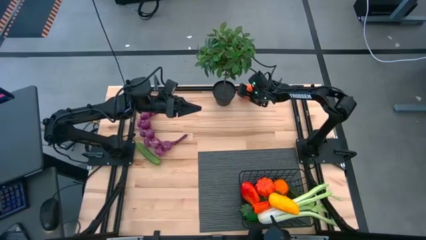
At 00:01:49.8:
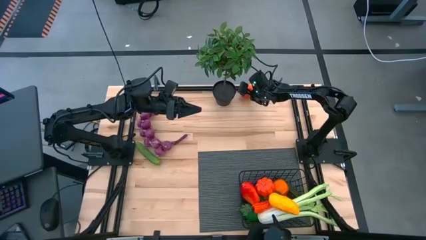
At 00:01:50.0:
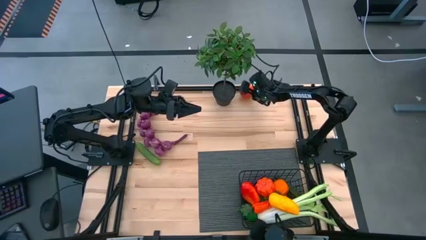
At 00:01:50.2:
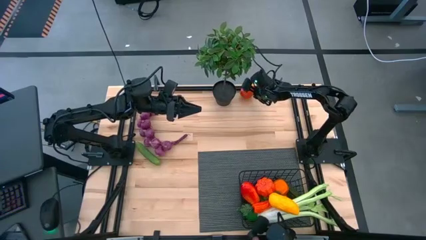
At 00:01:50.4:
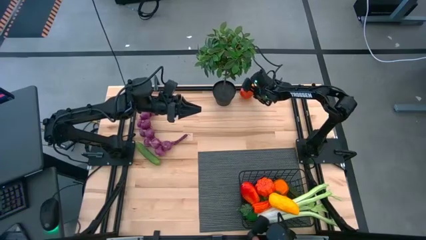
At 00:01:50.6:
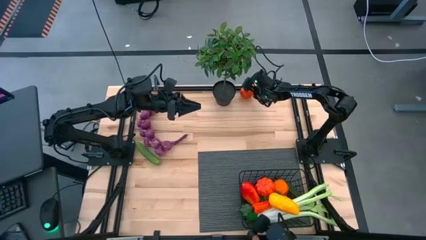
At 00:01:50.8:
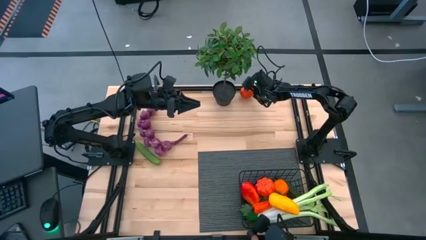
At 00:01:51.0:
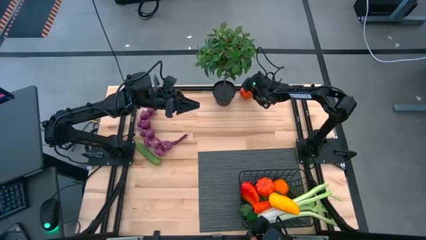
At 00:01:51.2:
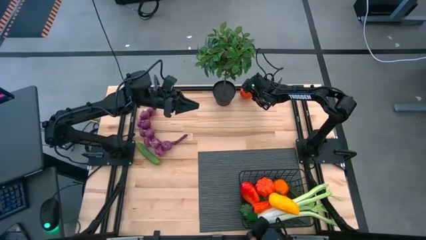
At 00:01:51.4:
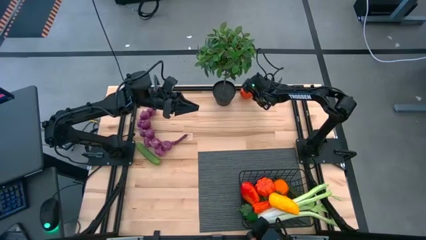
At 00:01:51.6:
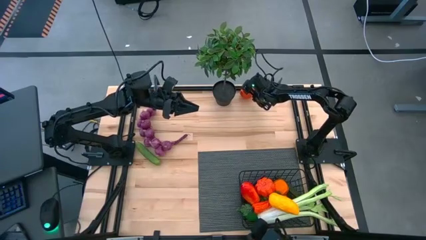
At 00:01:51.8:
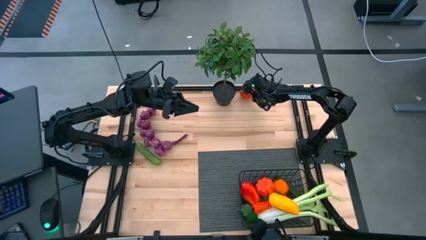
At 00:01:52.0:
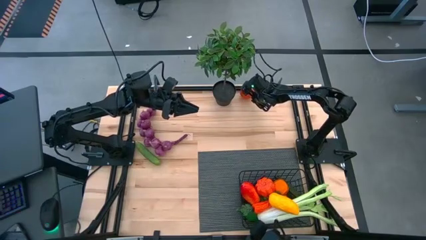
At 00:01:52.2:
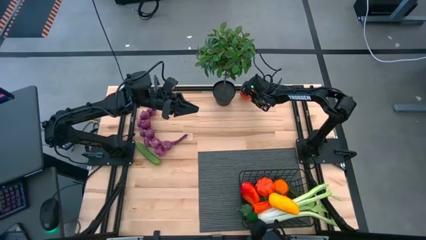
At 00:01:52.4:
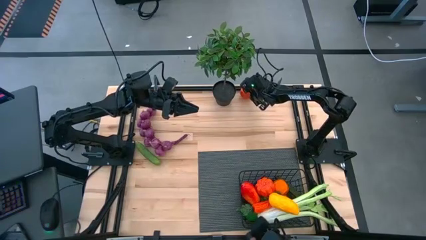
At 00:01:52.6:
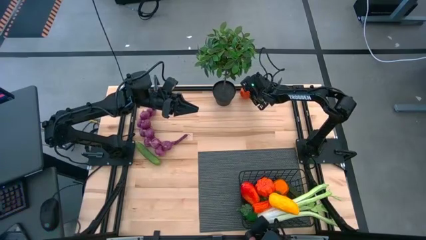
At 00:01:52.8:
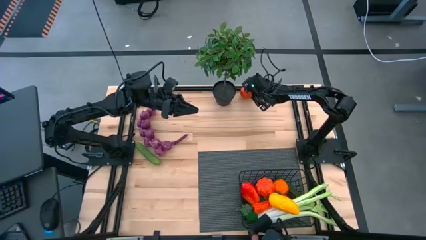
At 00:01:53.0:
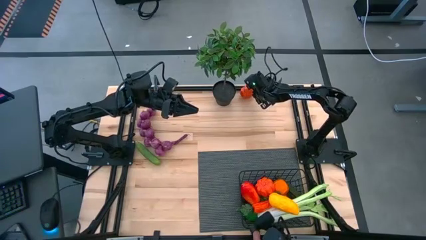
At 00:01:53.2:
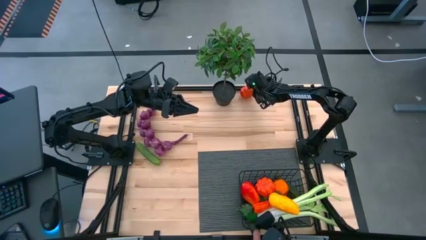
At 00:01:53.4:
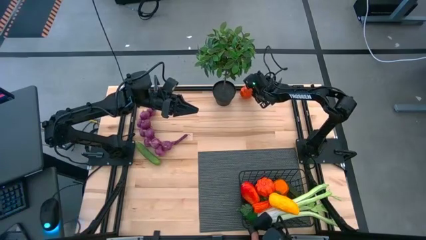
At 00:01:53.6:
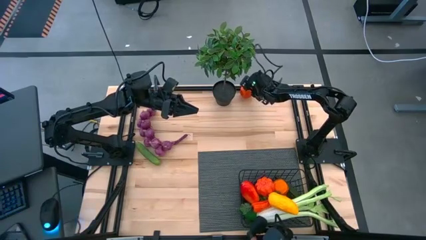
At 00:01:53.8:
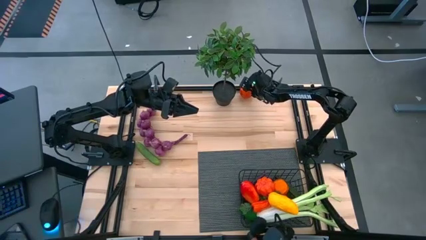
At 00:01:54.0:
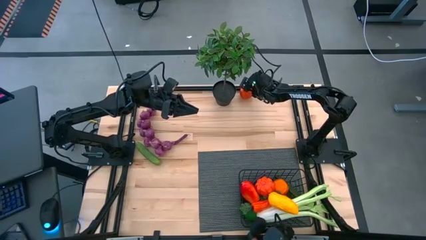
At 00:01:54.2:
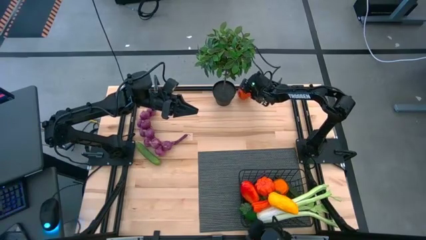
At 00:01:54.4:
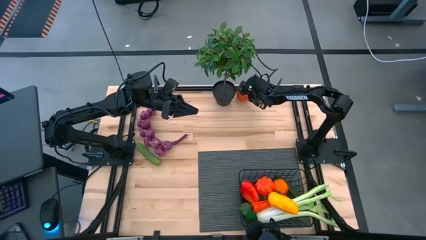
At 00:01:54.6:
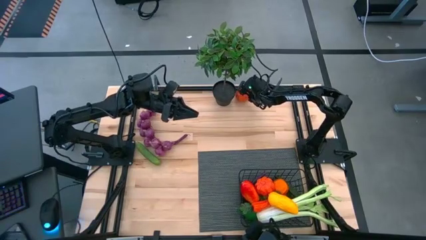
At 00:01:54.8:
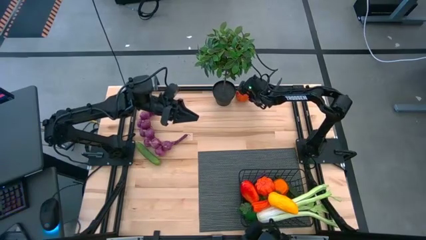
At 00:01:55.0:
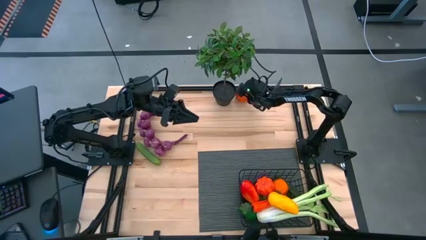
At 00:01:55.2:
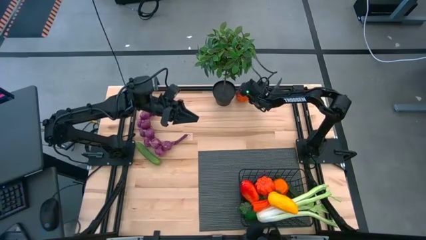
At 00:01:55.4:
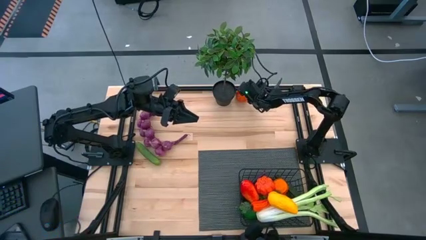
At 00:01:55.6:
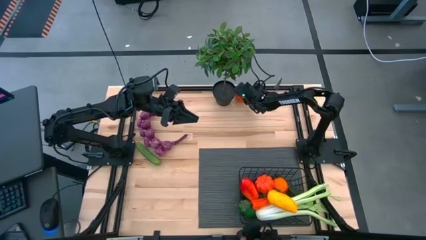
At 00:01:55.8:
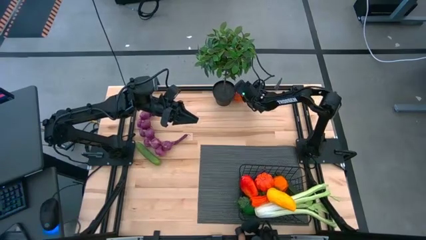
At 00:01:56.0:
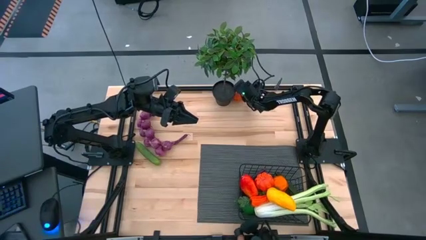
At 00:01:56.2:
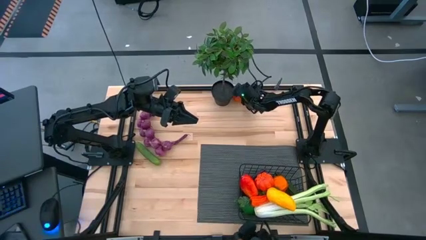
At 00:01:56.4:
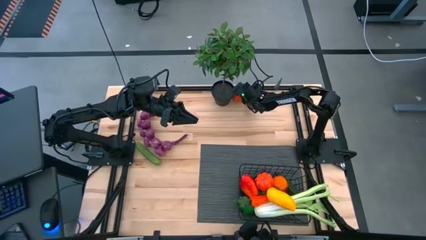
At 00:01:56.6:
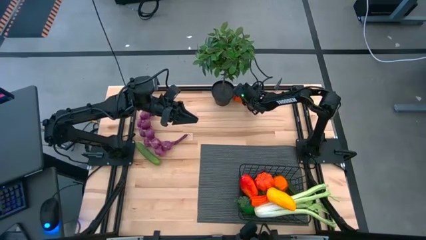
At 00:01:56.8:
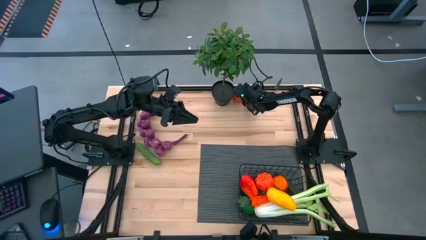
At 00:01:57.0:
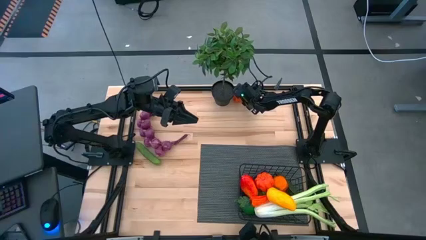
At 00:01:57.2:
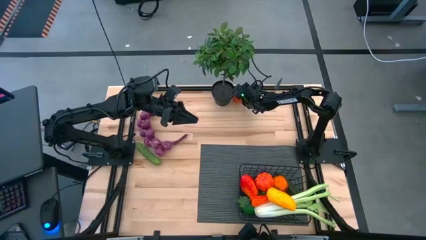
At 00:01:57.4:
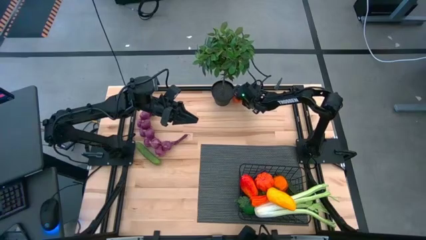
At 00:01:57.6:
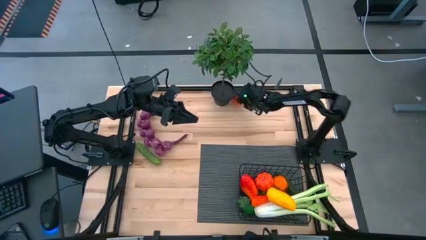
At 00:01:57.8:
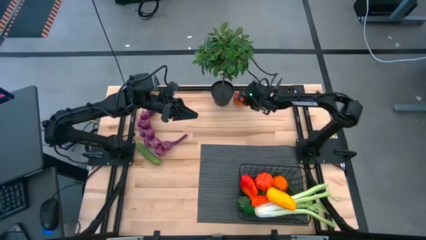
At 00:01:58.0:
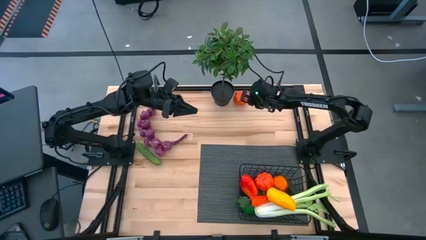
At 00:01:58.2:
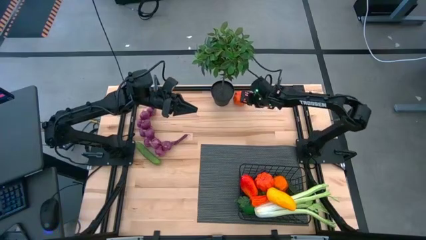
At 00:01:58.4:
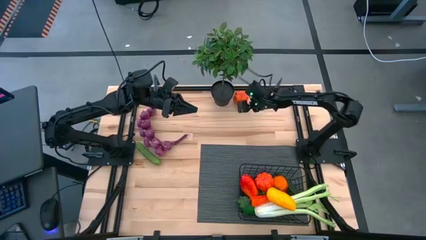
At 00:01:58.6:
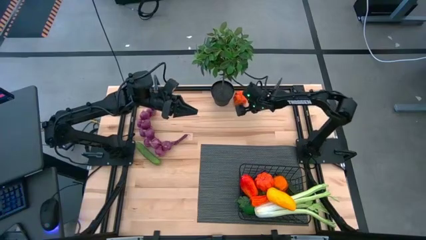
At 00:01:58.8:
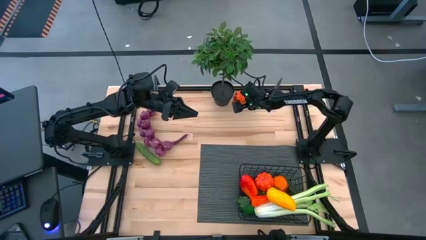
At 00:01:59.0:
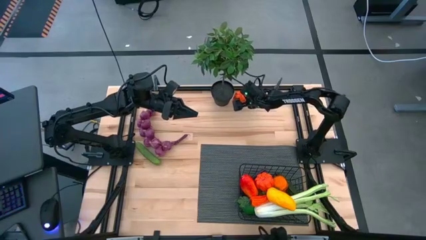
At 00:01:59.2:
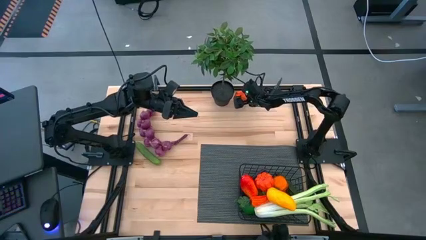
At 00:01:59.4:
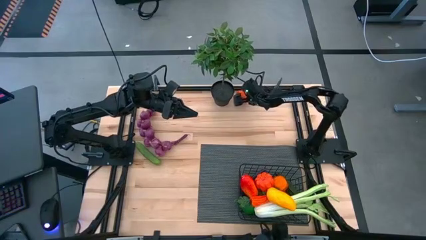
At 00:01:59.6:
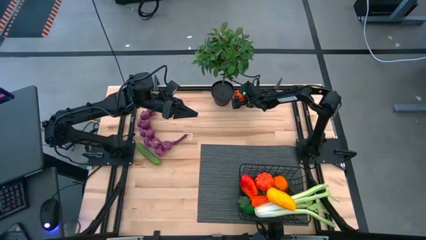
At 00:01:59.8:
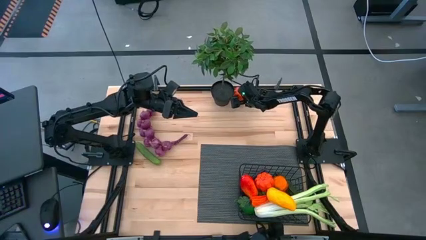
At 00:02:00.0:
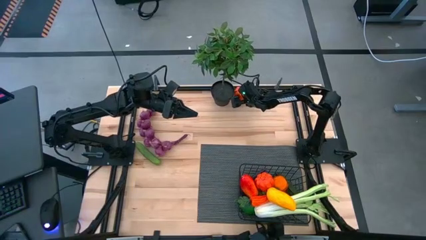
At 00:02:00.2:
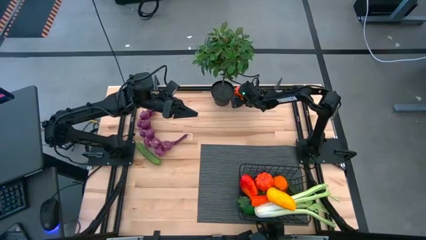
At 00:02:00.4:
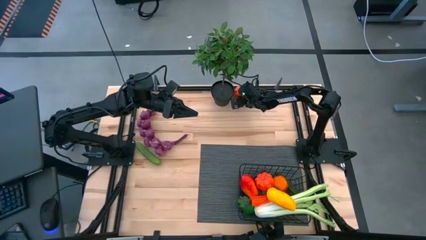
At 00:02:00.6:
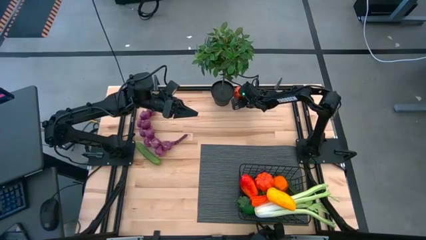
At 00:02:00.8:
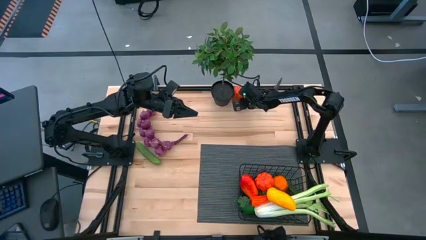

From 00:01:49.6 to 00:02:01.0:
Task: Build produce basket
Put the orange pumpkin into the black wire basket

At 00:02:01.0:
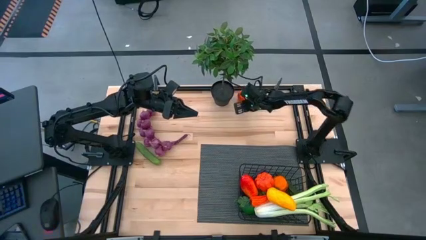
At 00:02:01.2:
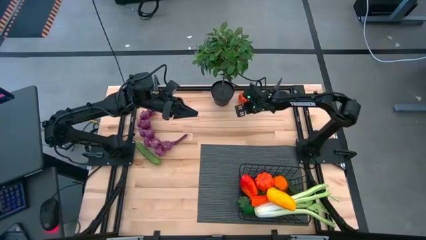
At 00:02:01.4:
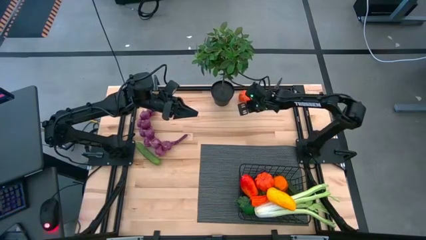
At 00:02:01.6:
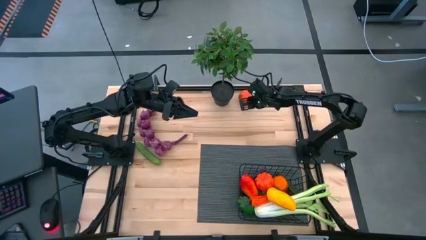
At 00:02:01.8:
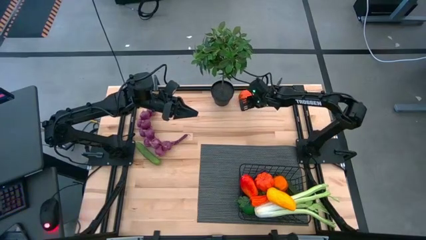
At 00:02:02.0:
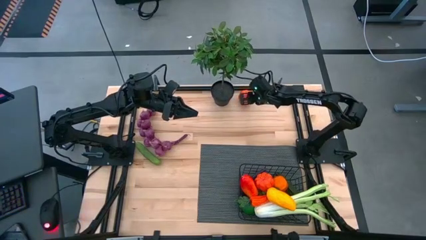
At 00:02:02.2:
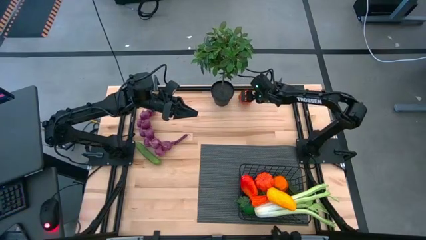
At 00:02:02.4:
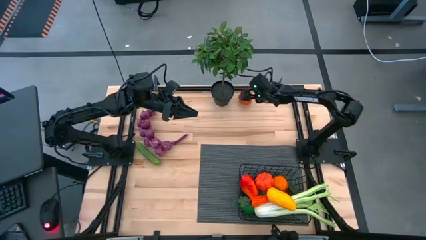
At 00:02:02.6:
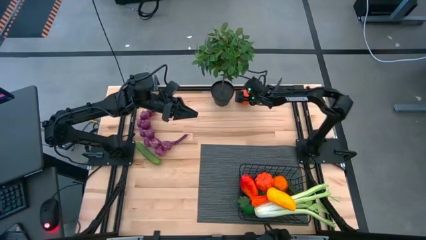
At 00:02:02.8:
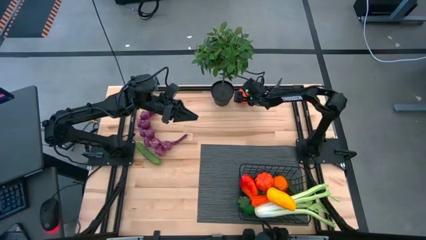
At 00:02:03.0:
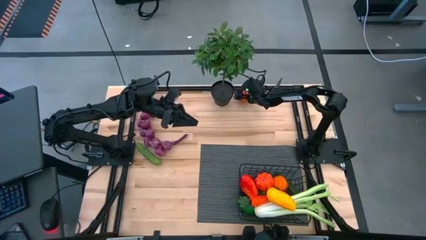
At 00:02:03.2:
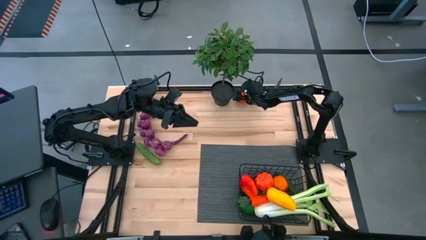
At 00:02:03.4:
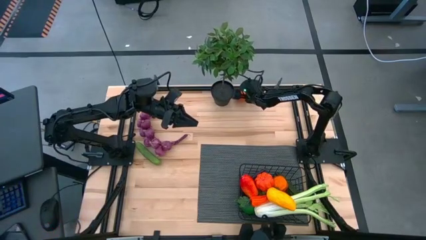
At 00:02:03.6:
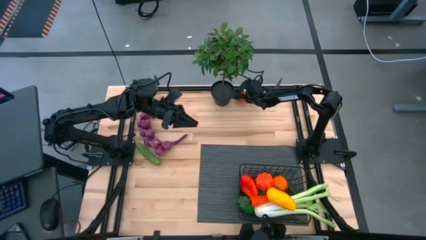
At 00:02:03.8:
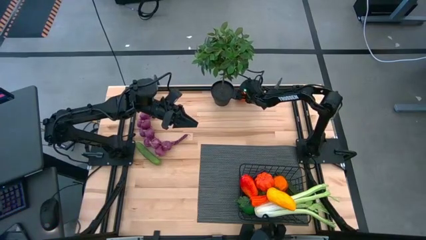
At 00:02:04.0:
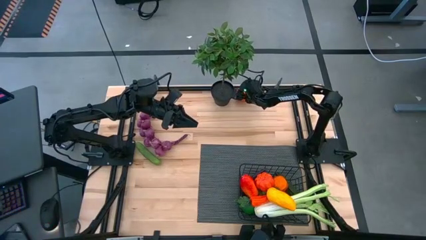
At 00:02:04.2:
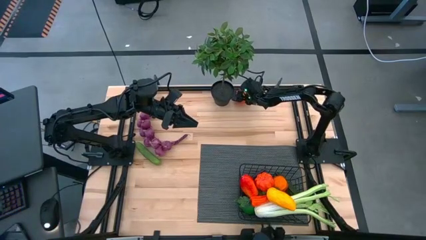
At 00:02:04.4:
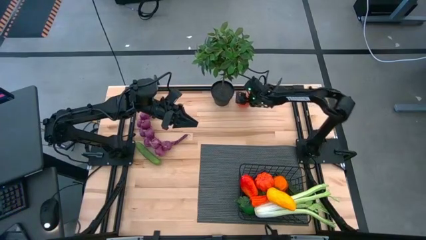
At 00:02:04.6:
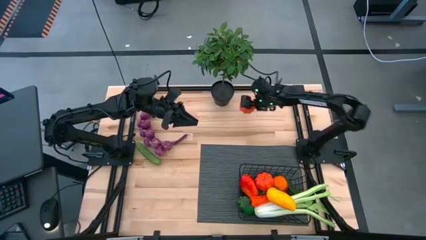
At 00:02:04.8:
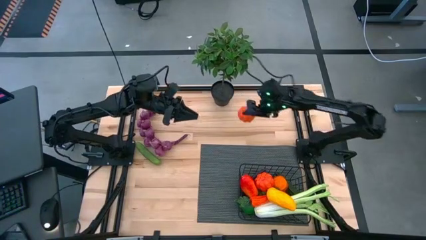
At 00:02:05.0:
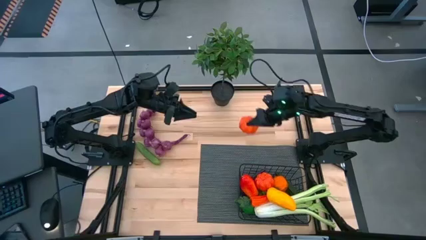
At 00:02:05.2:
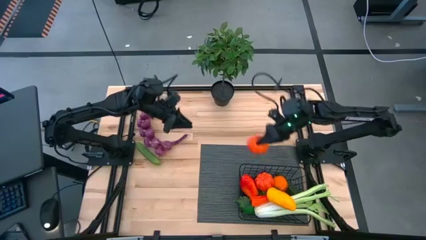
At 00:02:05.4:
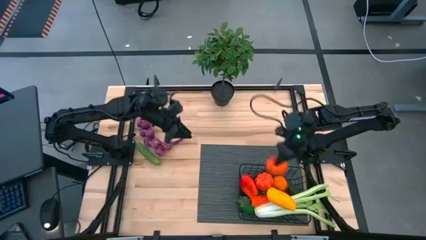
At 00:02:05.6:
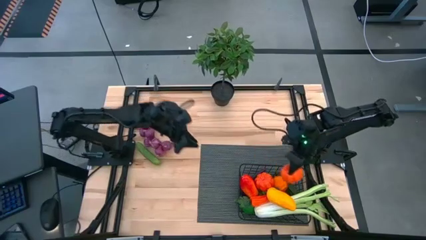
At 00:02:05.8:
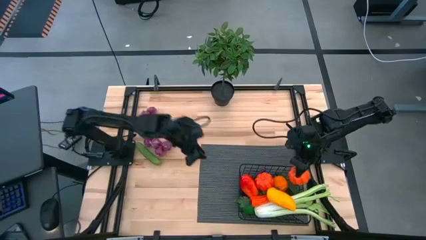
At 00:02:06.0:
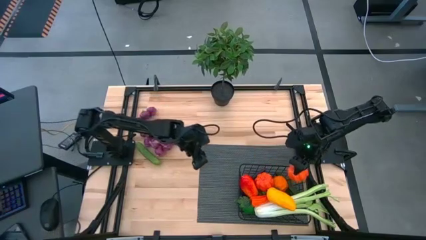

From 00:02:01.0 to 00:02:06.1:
Put the orange pumpkin into the black wire basket

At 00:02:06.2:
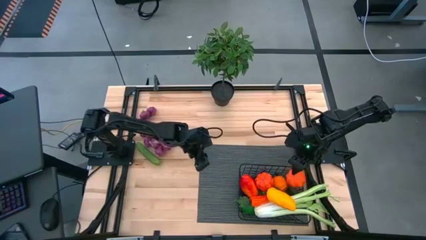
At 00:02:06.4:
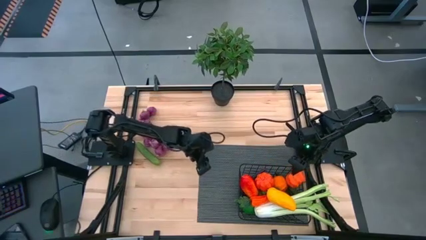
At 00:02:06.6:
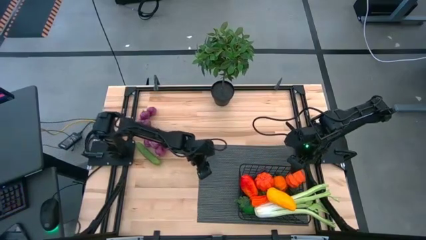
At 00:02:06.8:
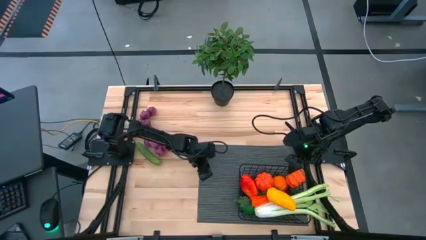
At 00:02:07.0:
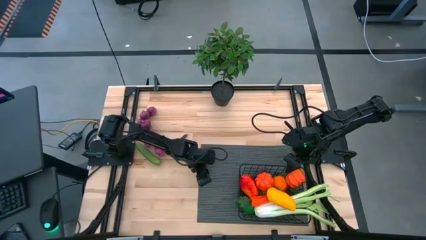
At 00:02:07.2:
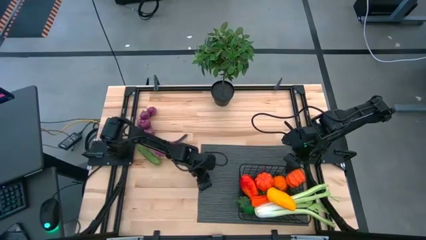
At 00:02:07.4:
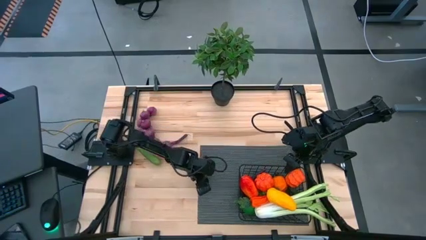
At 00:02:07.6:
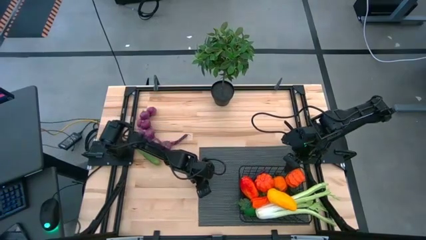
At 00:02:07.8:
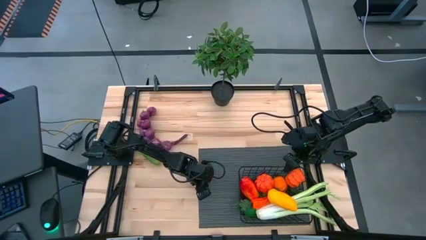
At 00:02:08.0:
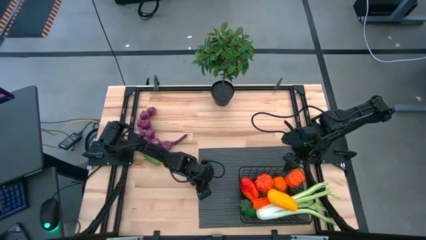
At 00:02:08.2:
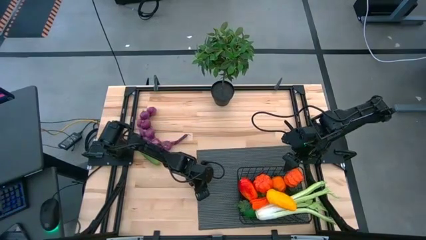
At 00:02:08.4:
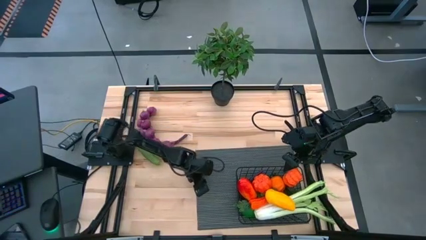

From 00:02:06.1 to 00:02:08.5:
Adjust the gray table mat
